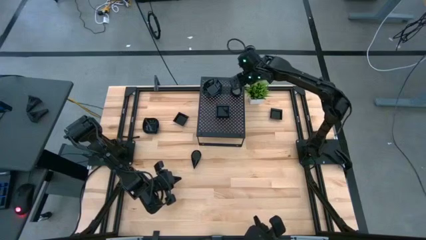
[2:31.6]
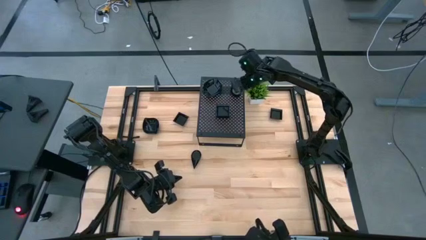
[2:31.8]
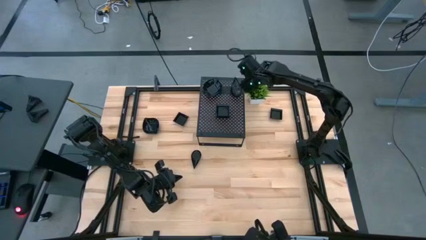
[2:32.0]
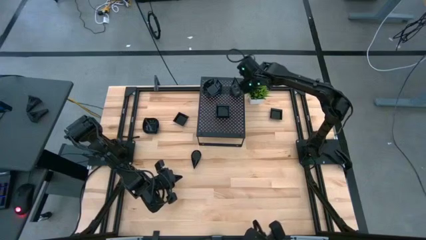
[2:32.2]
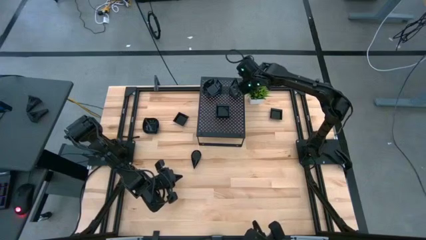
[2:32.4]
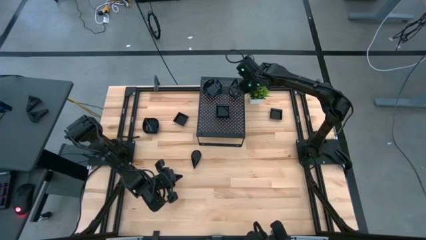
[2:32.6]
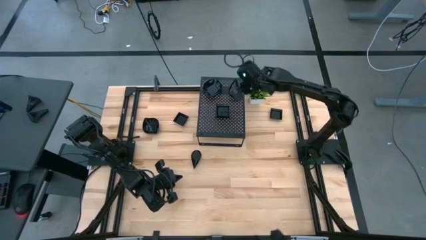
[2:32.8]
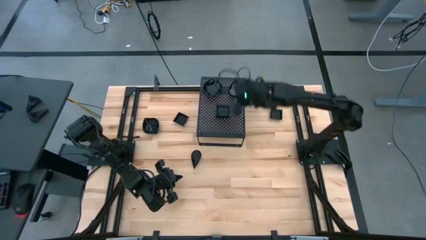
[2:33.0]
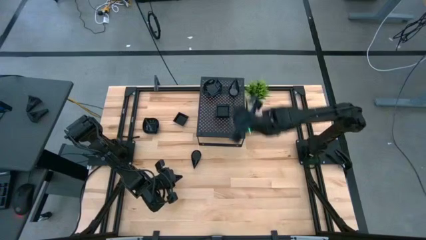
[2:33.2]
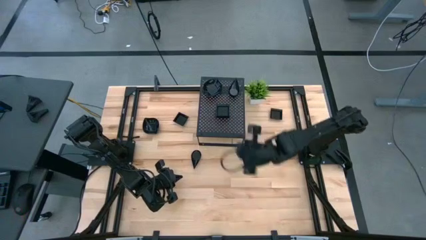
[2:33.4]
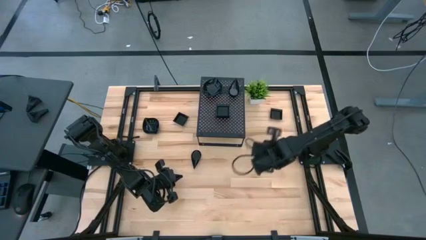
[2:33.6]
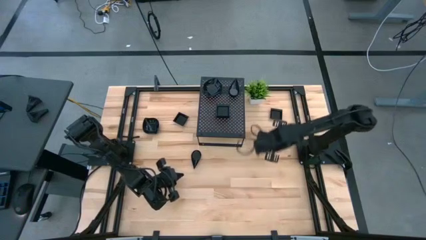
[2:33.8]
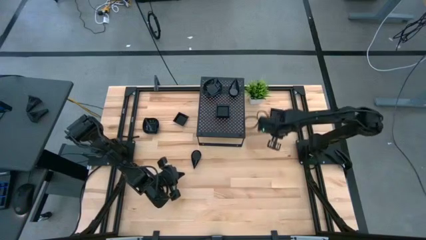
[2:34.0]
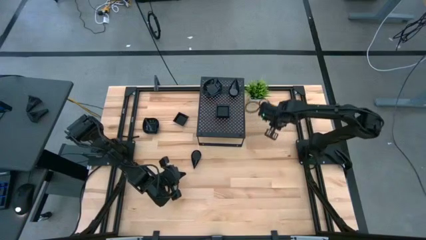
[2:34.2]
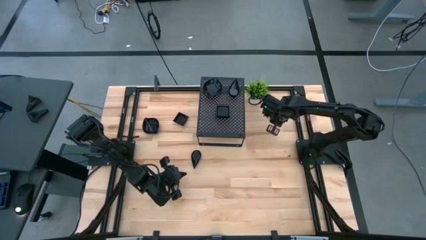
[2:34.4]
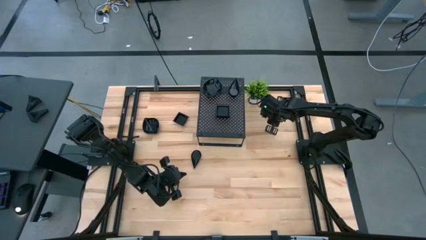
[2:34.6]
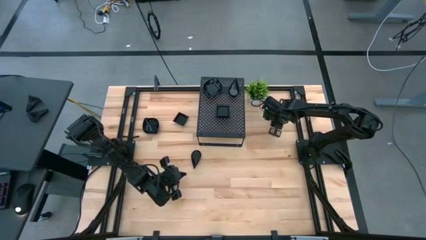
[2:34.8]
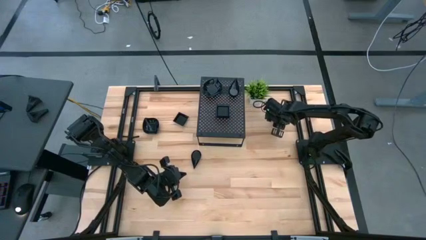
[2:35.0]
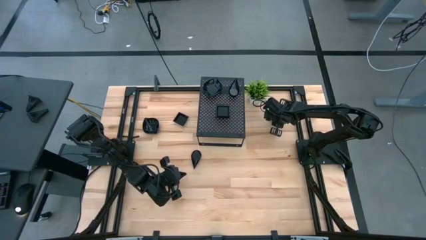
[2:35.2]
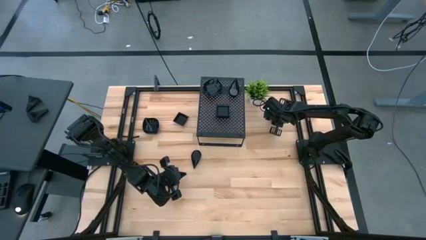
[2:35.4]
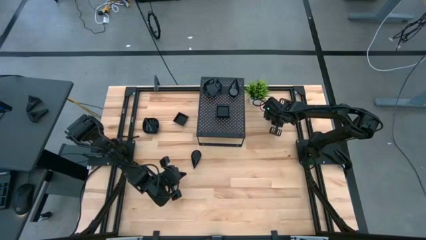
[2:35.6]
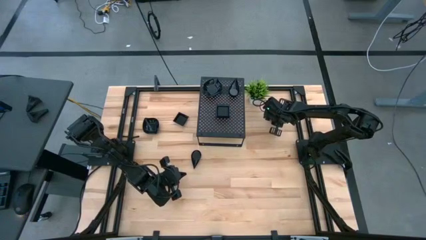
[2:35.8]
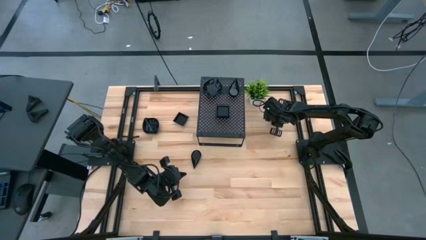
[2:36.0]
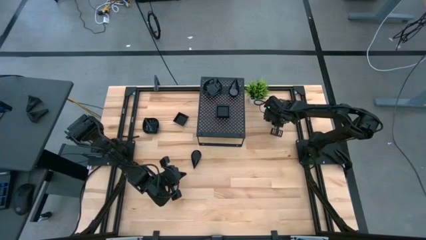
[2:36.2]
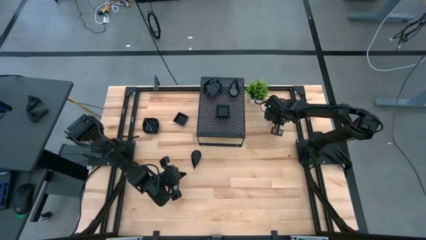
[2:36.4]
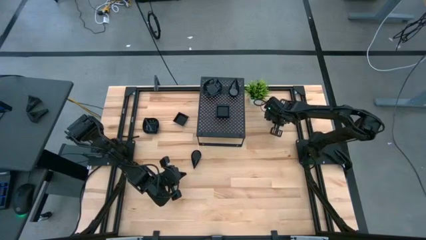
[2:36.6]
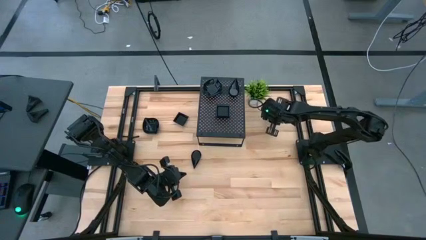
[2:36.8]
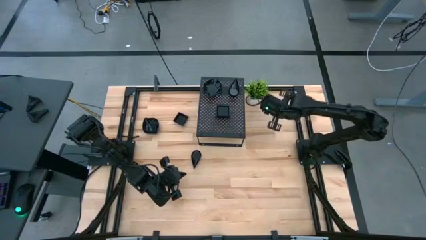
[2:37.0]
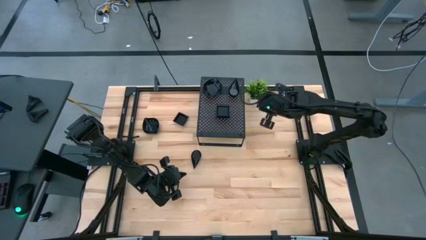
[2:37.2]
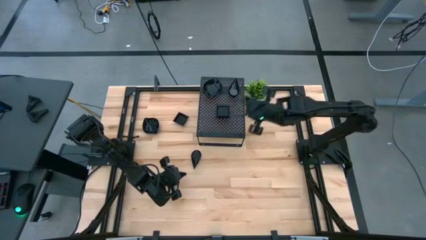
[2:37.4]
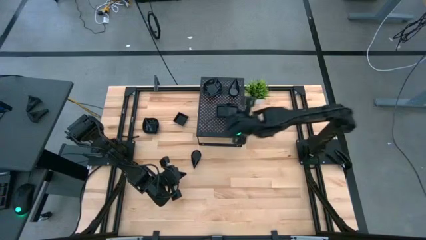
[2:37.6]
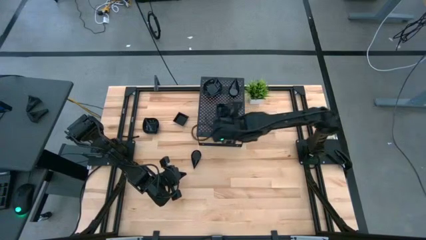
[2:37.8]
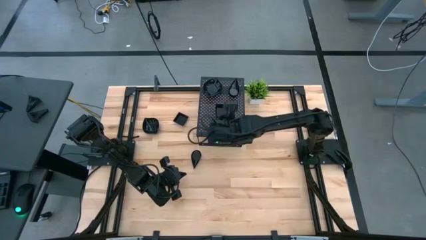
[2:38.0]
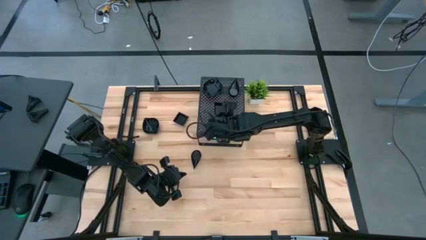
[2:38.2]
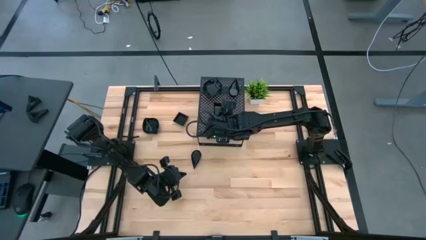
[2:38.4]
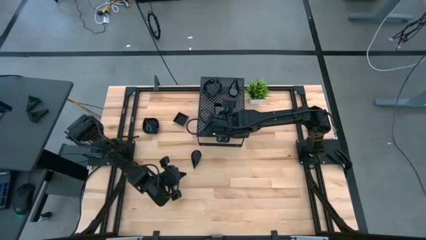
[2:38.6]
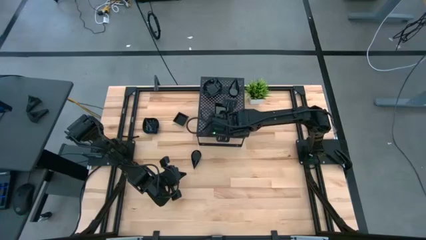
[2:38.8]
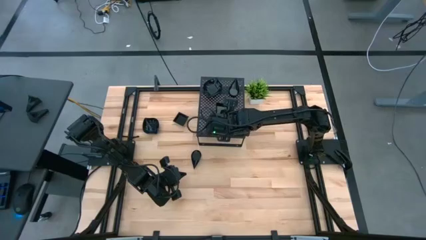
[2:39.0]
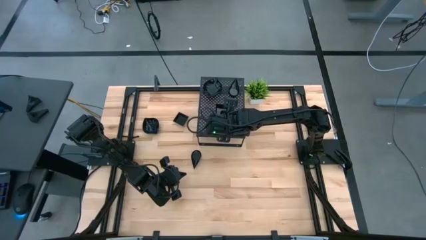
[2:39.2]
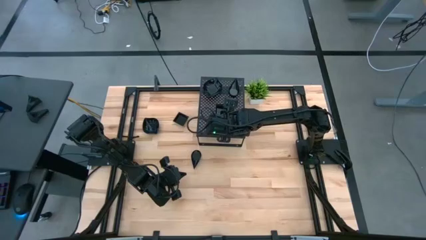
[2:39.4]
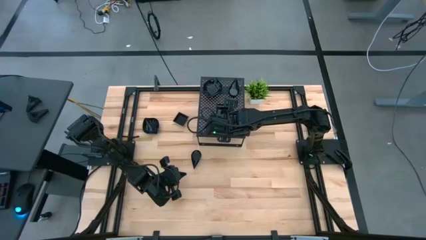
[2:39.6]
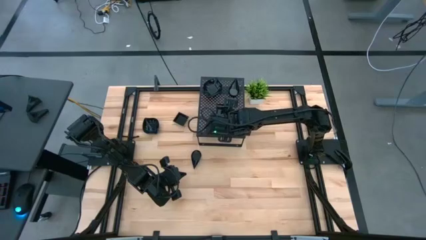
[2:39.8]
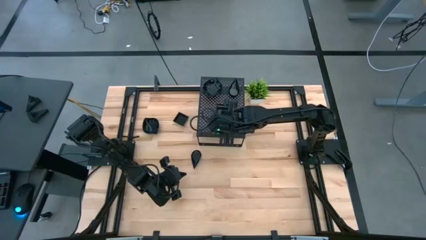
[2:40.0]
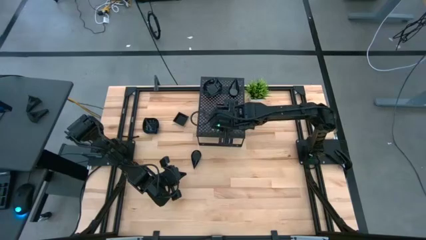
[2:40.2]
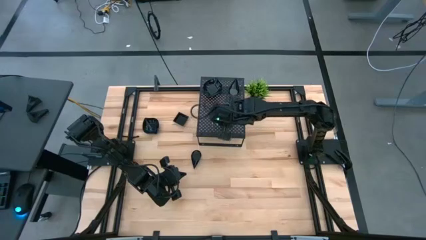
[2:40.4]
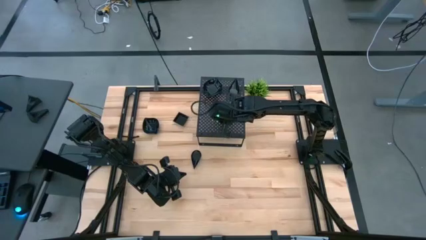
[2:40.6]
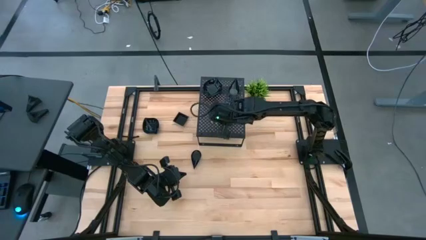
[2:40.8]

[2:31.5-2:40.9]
Task: Pick & Place Mini shaped plates
Stack the black square-shaped plate on top of the black square-shaped plates on the shelf

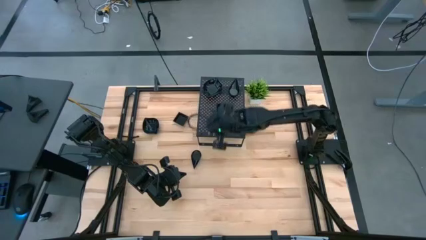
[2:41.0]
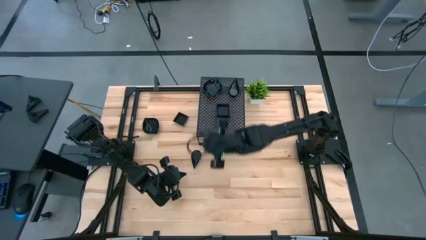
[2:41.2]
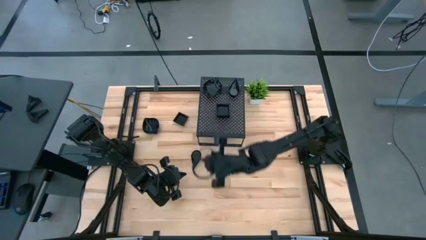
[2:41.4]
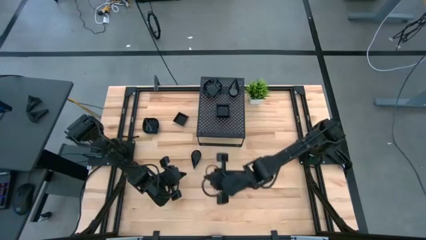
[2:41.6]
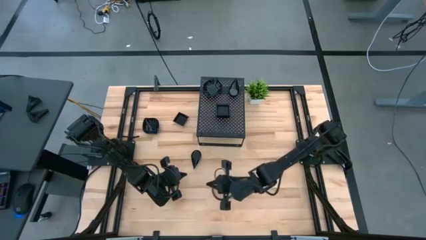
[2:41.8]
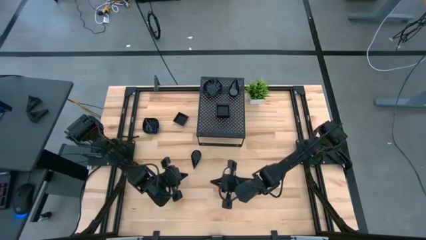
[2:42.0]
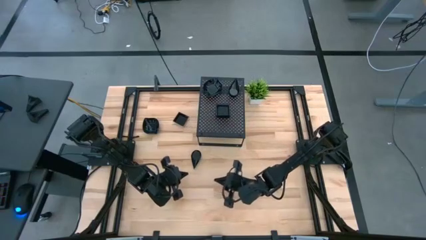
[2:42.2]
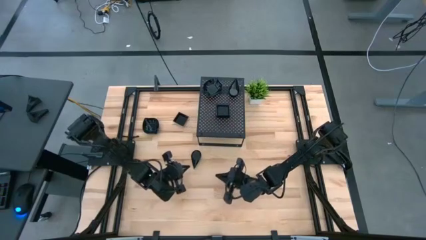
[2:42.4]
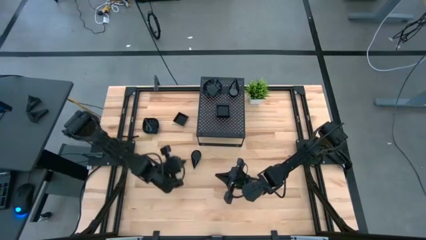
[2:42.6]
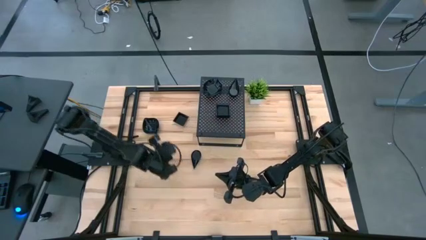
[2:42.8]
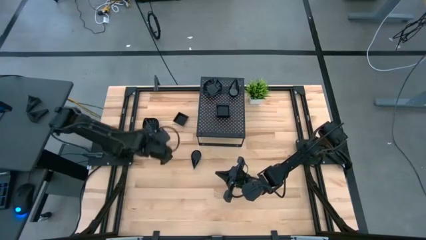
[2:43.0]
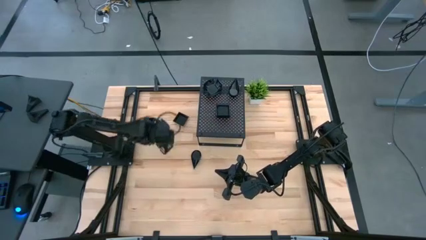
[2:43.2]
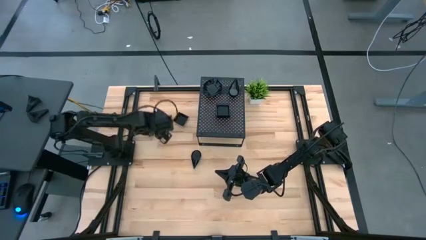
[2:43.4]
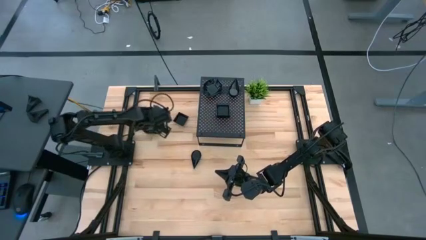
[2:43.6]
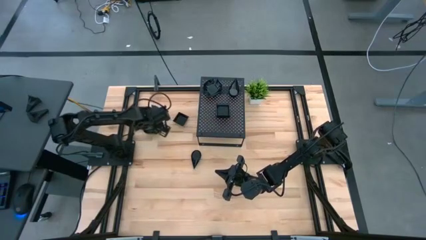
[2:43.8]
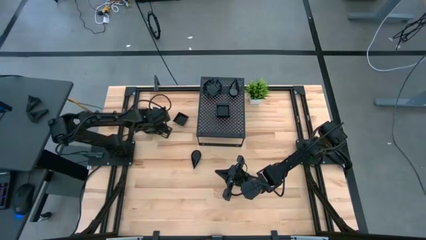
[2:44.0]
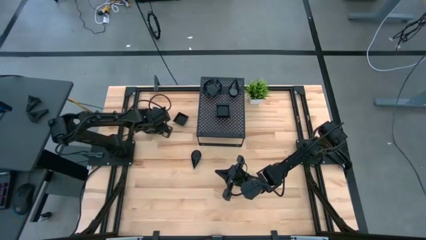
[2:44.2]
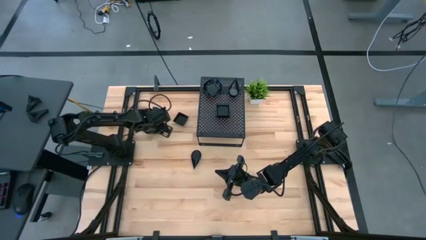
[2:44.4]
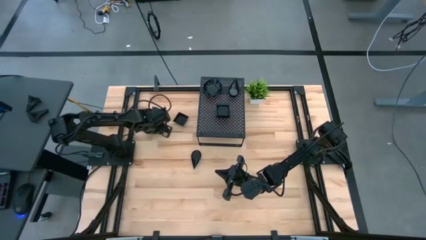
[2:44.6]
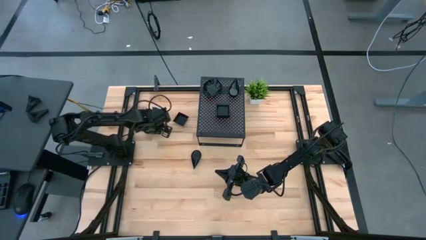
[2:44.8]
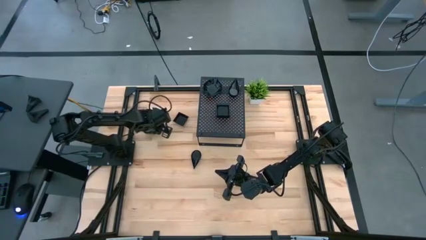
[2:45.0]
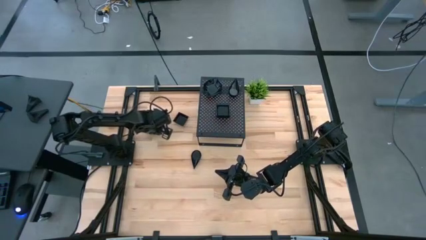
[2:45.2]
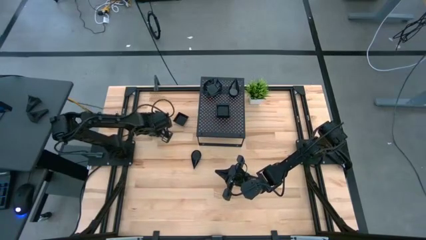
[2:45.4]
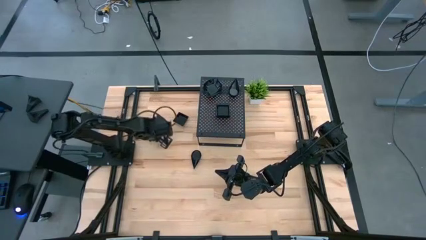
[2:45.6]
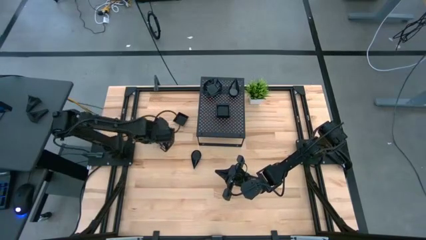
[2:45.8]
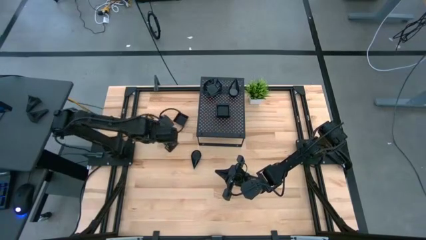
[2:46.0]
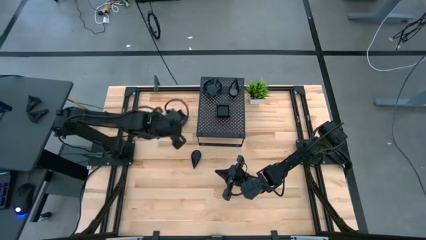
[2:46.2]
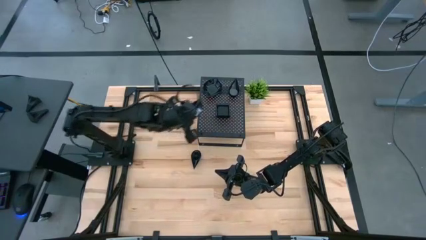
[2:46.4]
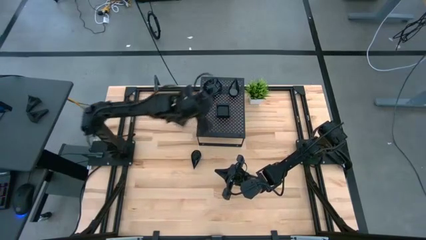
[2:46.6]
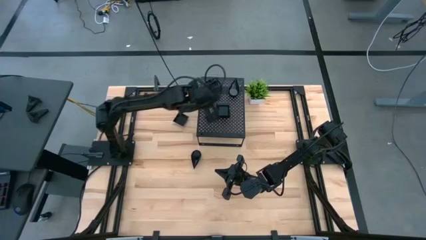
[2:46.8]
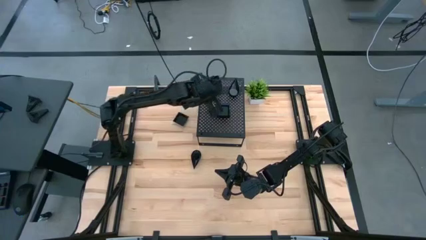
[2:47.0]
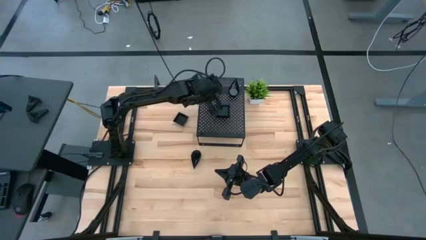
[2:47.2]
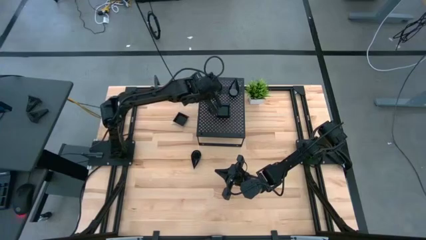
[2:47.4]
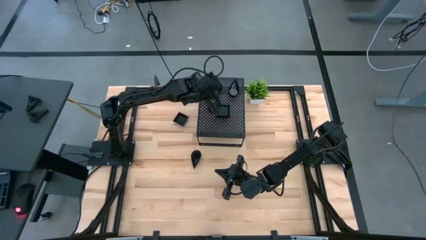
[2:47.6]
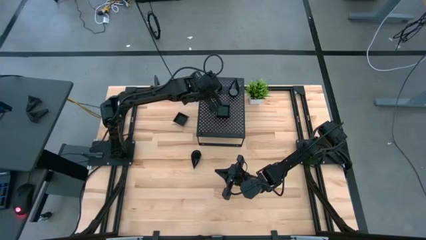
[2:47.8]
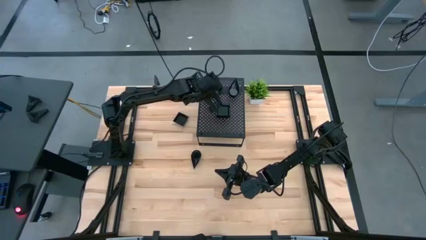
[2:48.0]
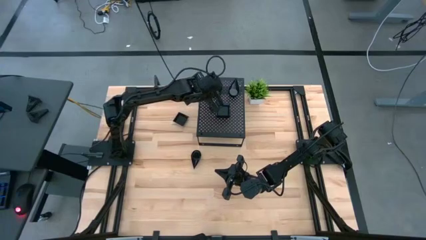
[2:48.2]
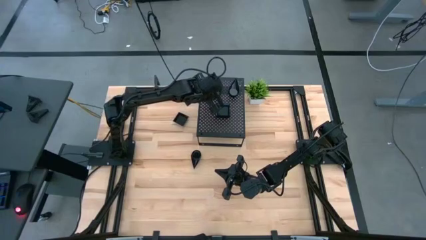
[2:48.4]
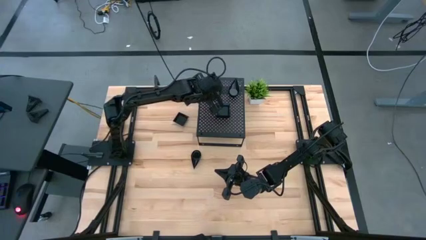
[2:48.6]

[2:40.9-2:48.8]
Stack the black leaf-shaped plate on top of the black leaf-shaped plates on the shelf
